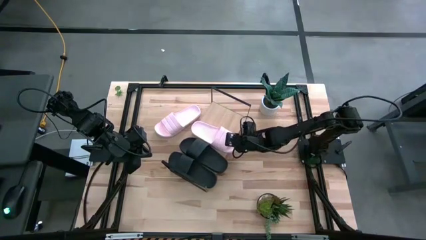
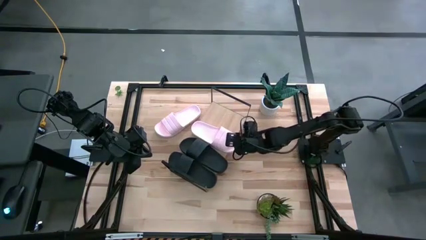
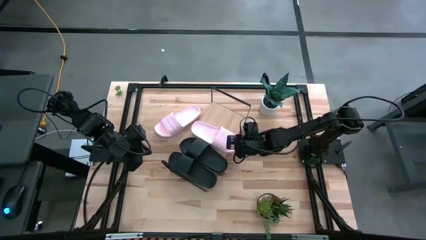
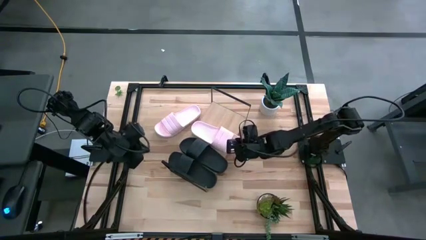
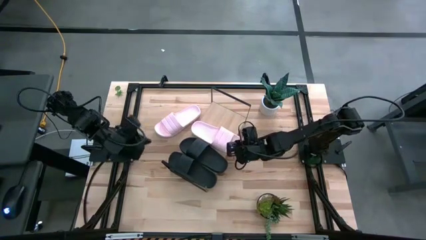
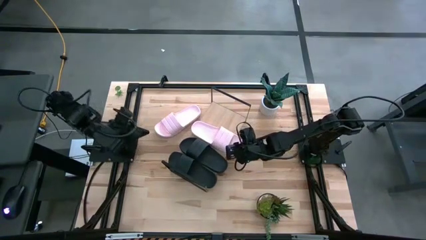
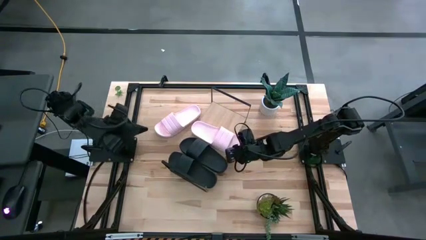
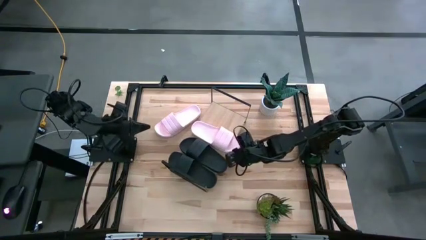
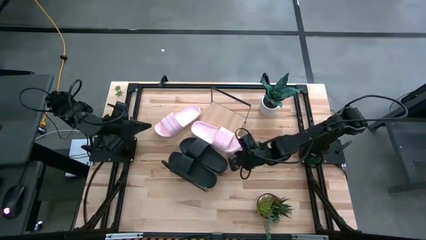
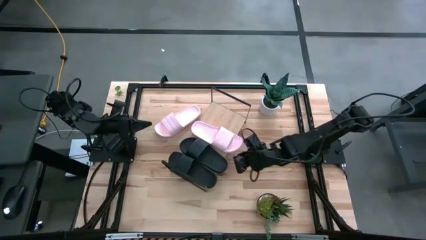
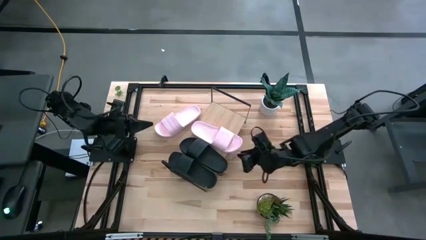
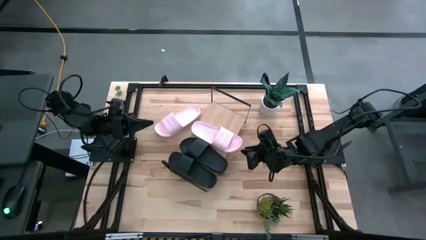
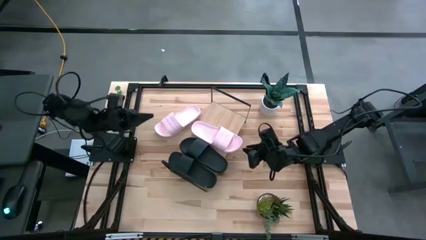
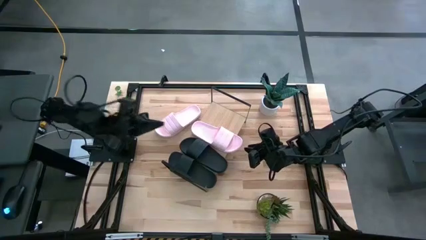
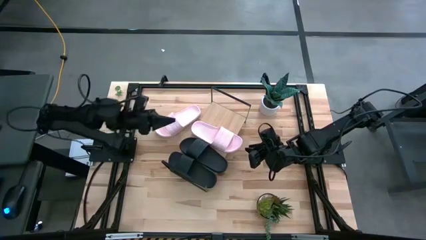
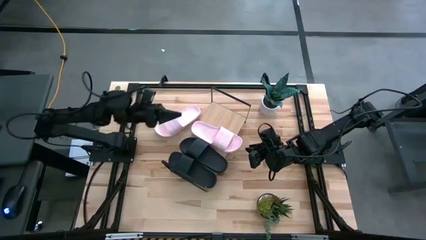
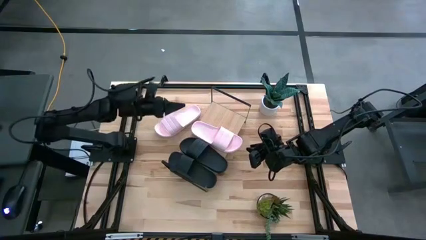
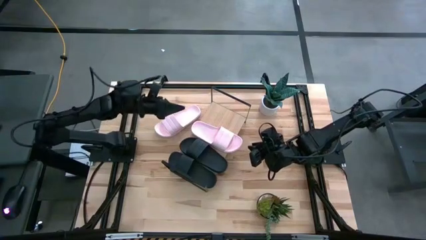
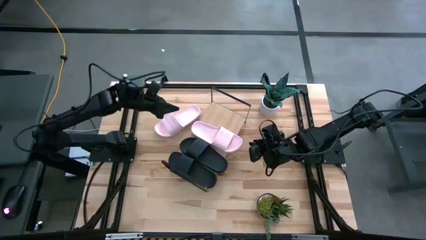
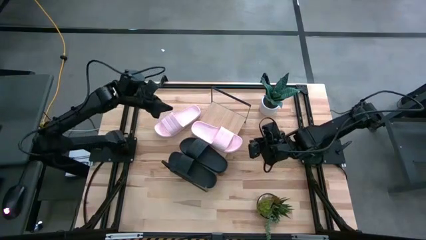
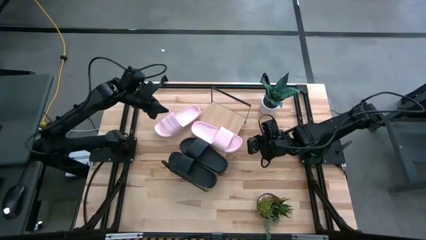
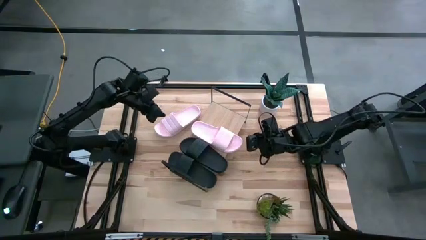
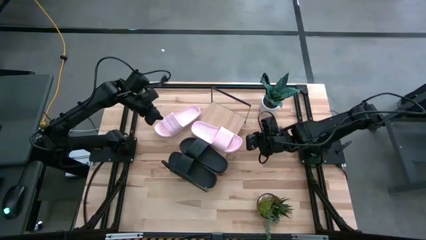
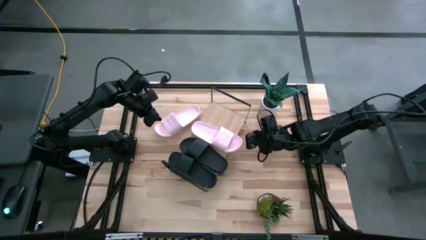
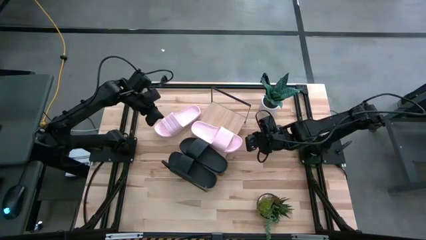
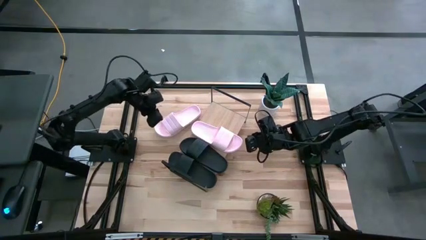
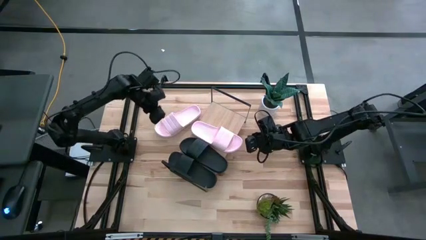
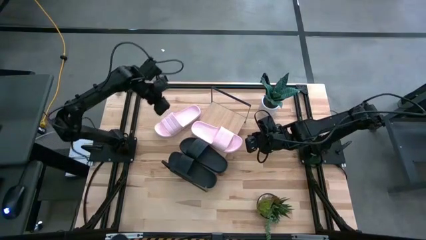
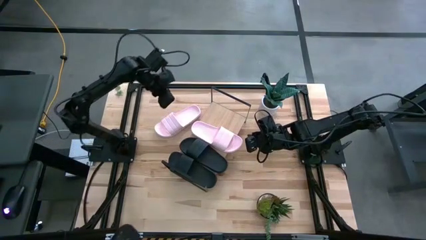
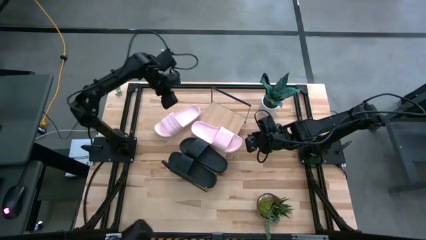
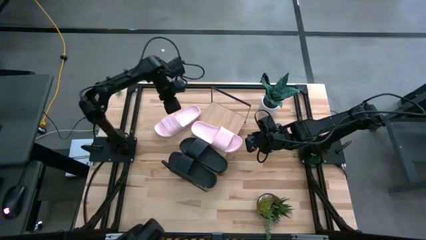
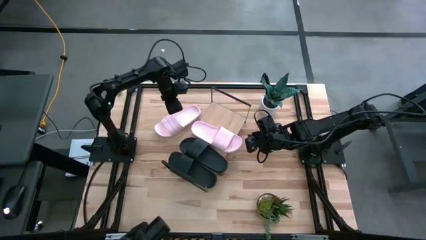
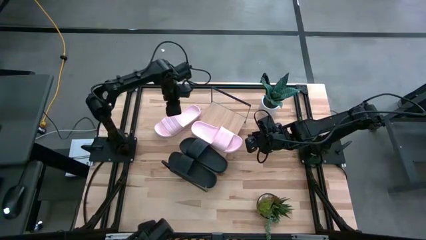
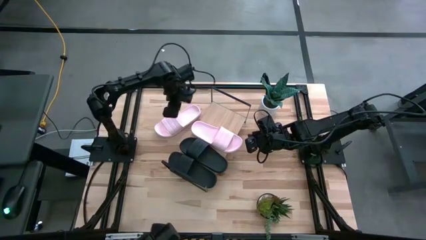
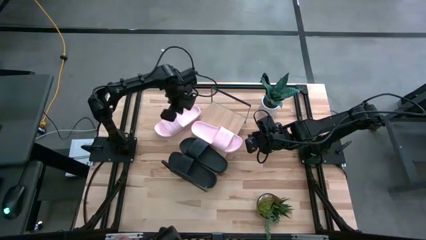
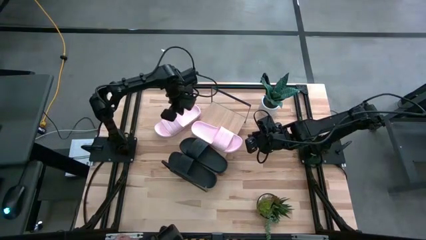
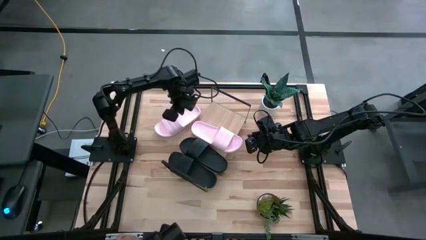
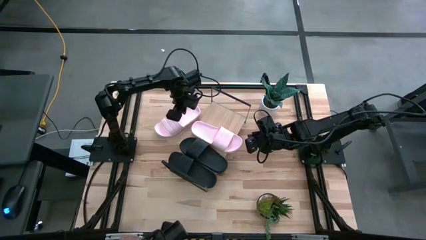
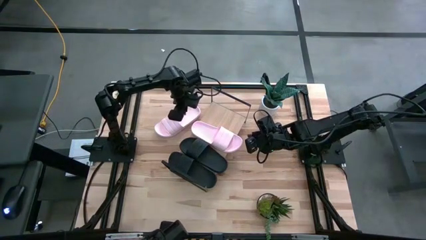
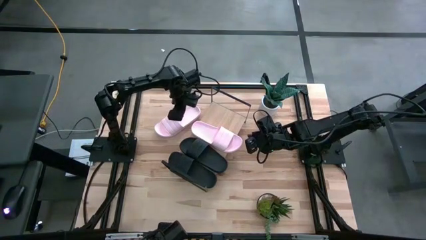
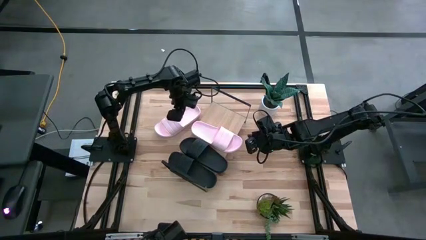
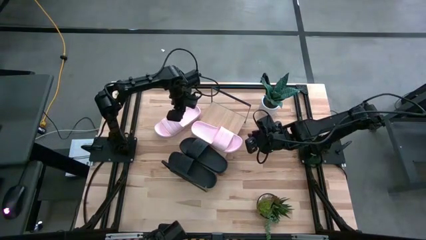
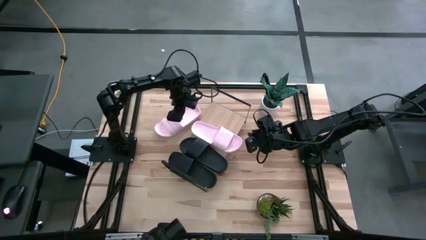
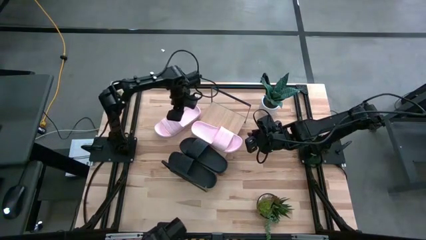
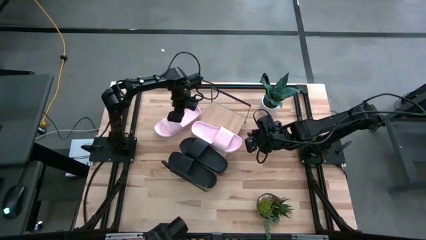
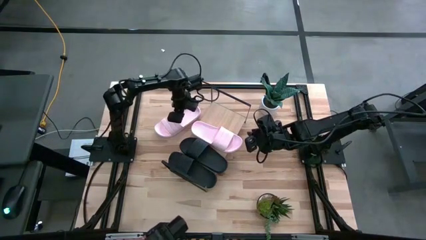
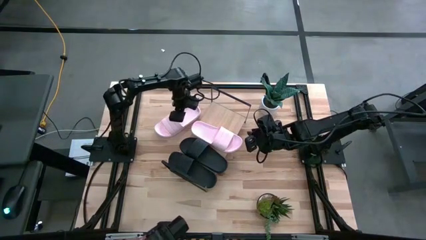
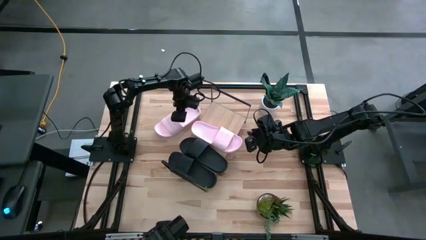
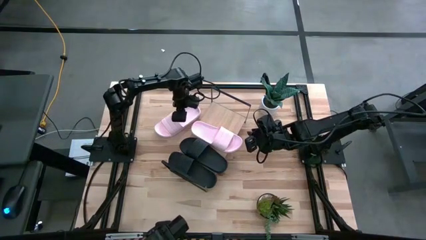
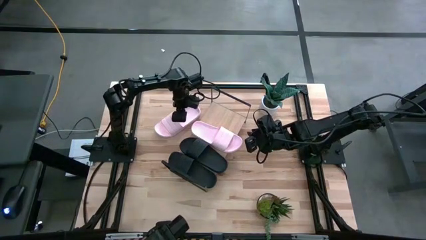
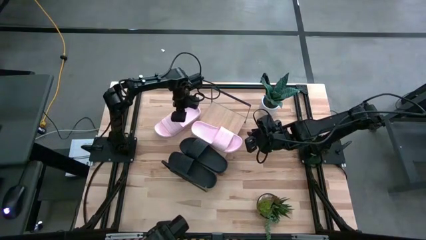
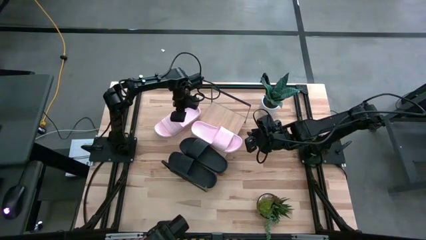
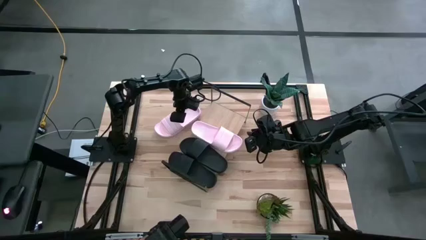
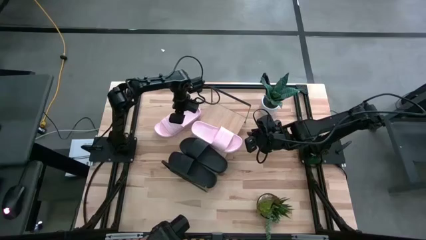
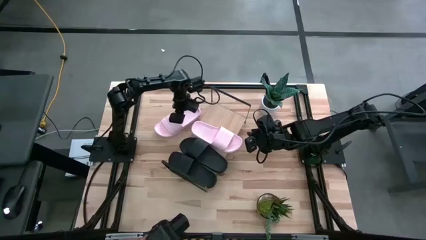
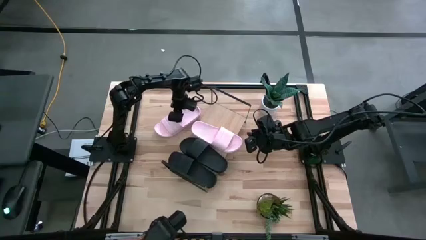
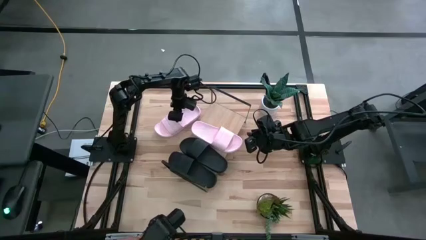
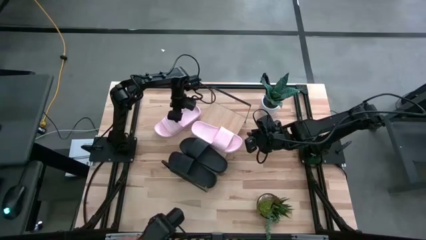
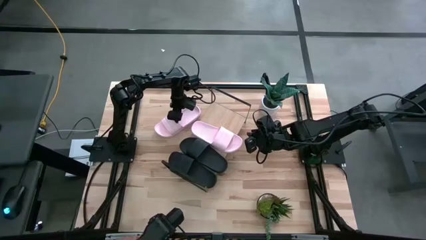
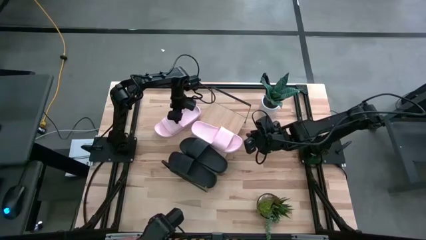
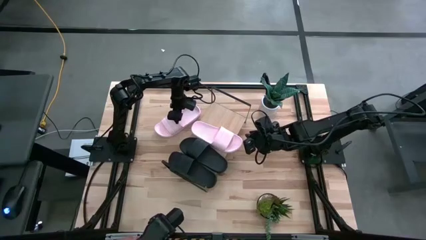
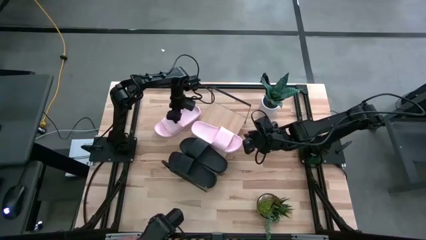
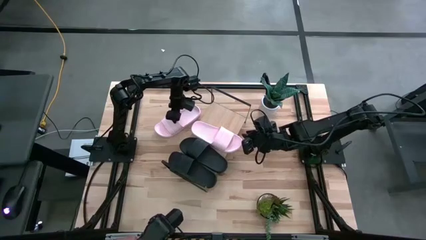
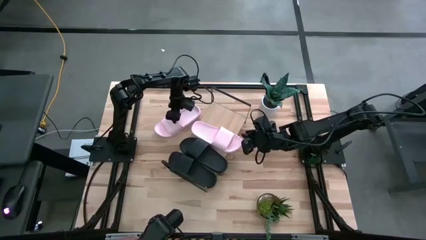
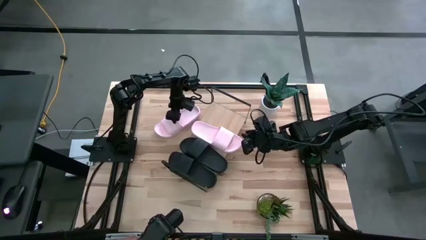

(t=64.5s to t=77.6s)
Task: Pick and place slides into the shelf
Put the pink slipper on the shelf
